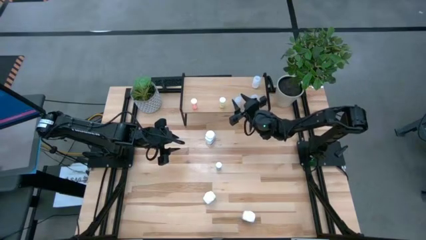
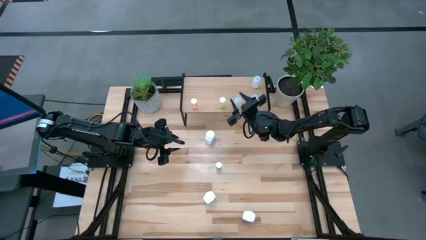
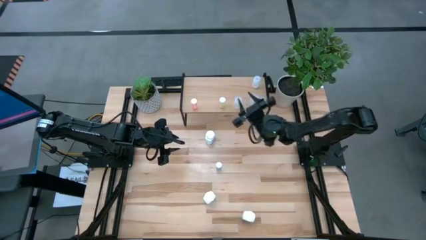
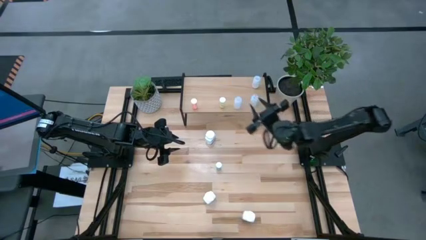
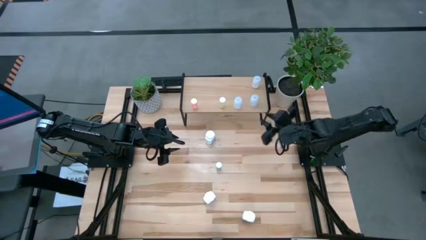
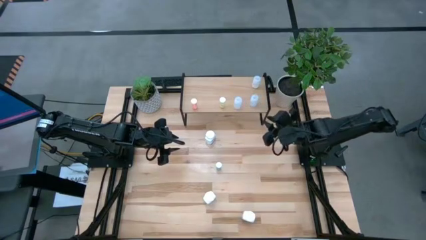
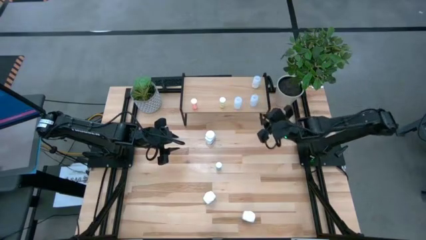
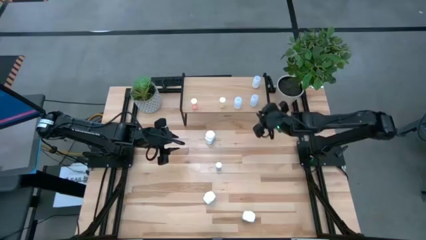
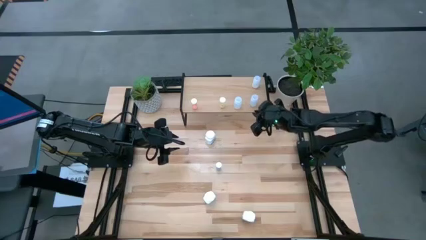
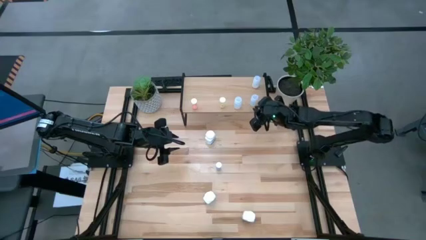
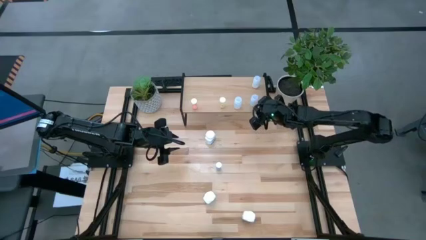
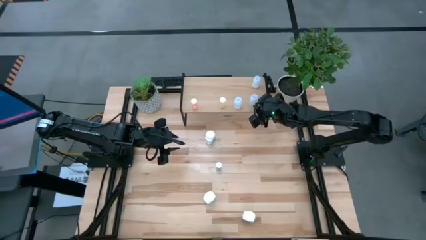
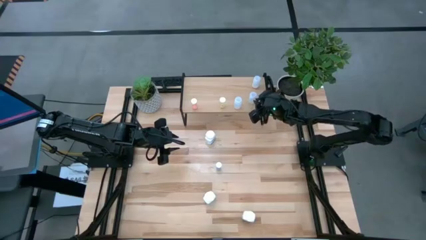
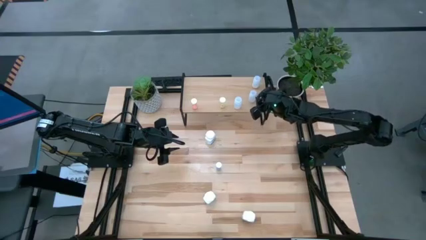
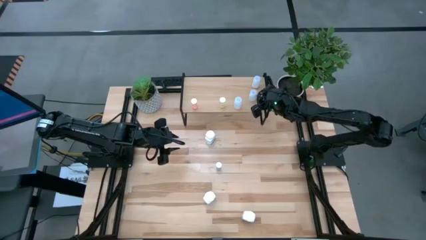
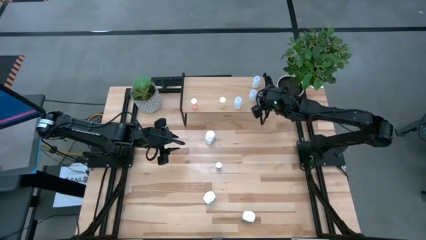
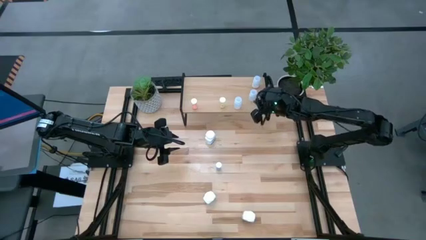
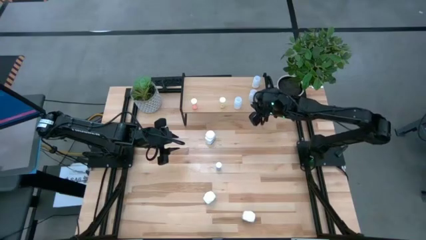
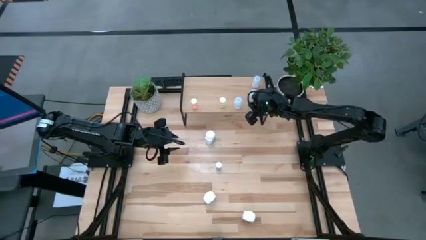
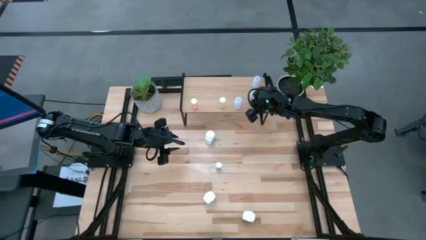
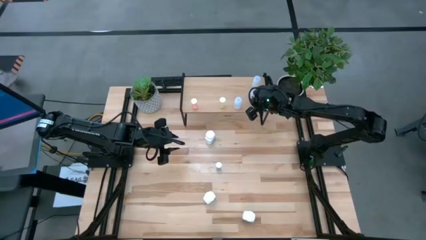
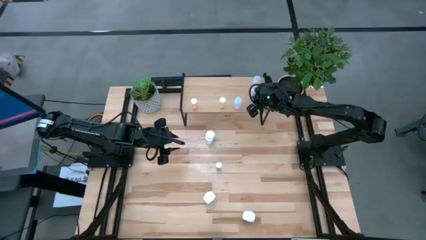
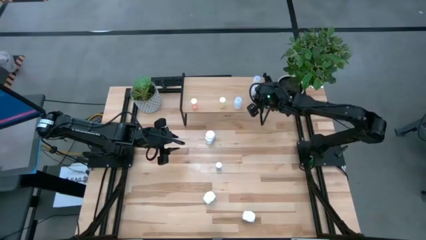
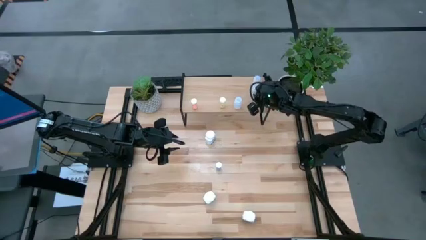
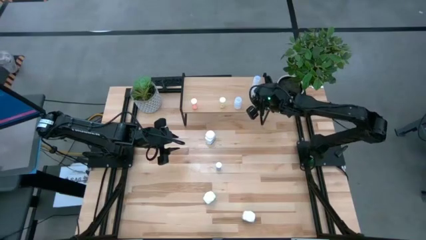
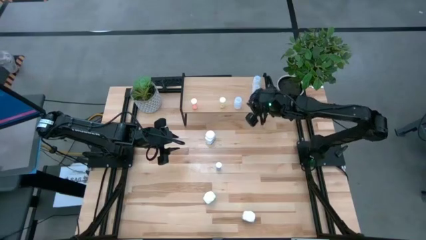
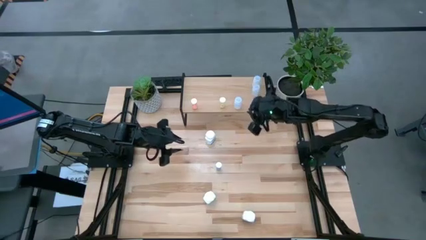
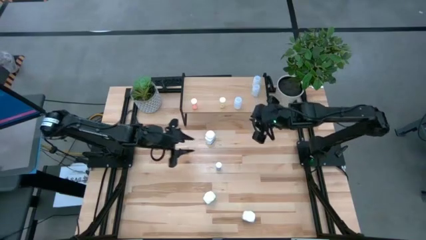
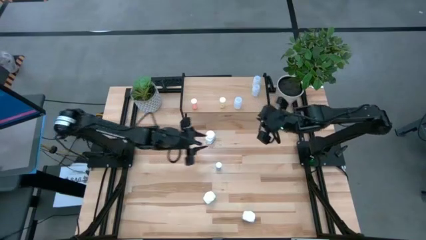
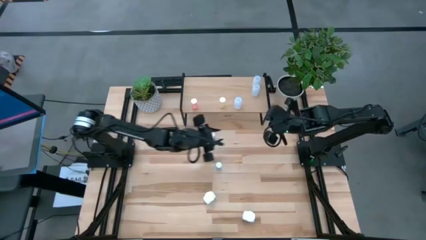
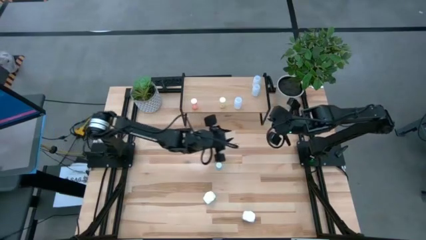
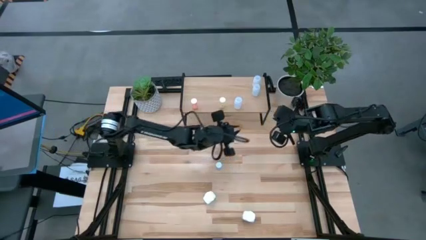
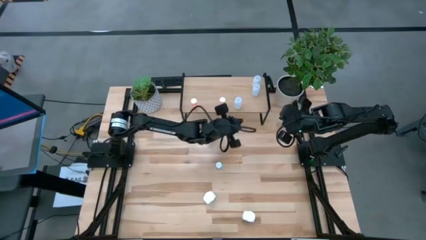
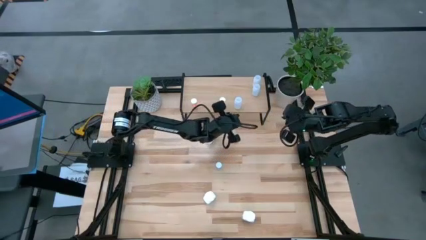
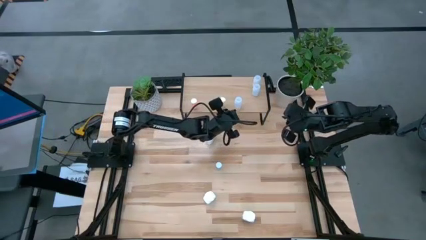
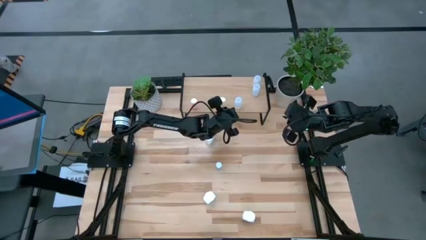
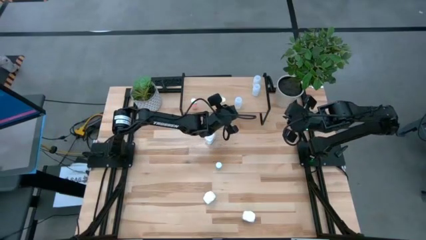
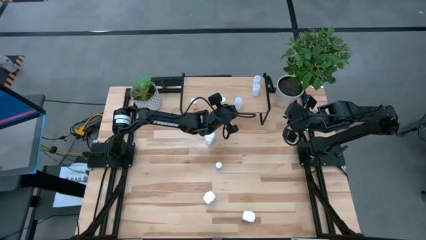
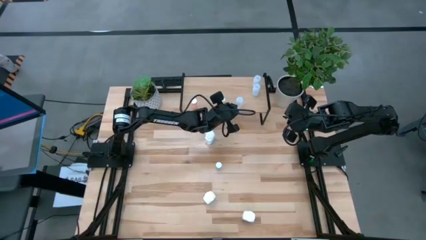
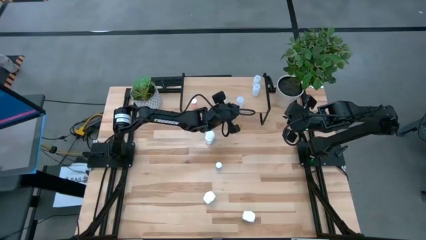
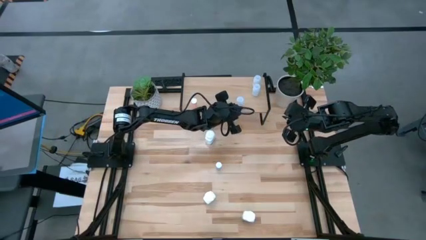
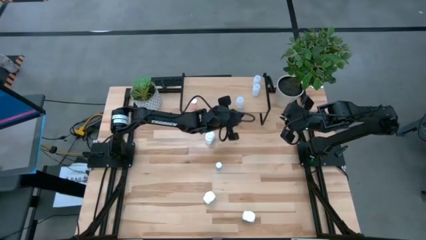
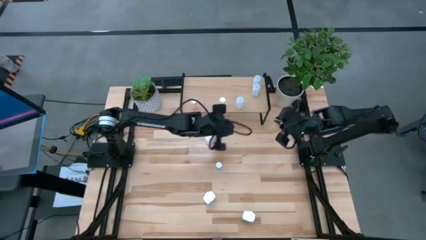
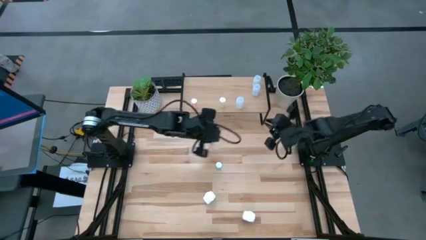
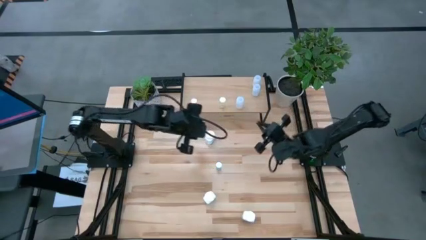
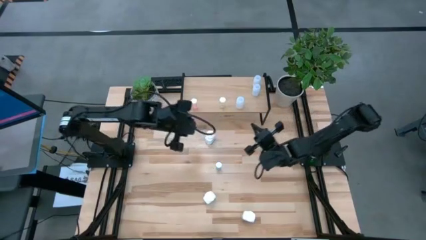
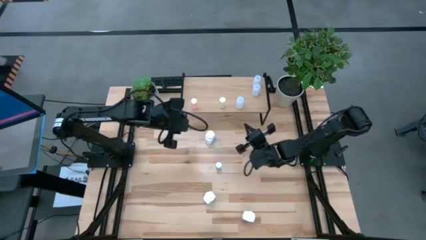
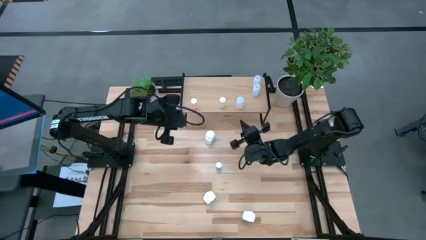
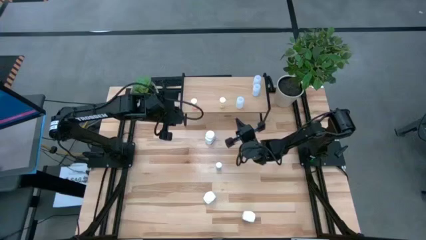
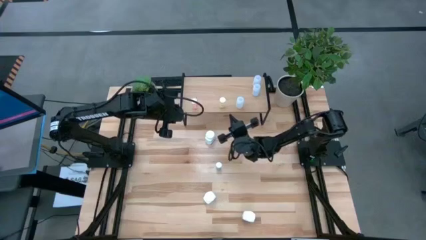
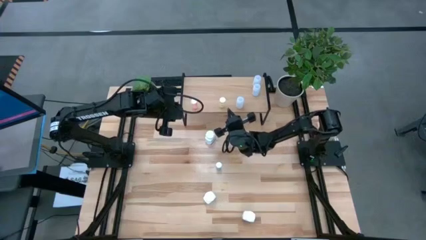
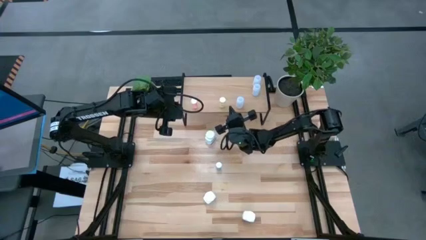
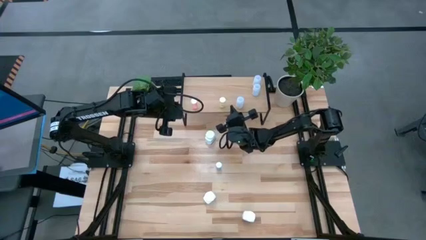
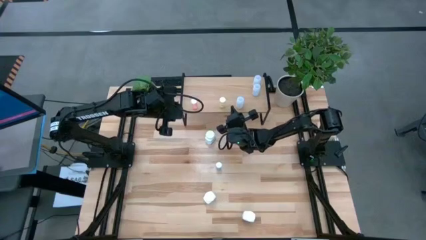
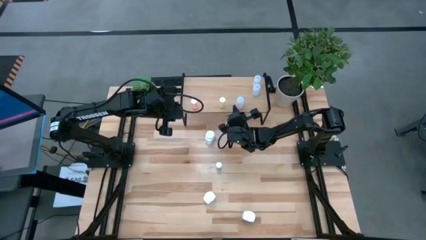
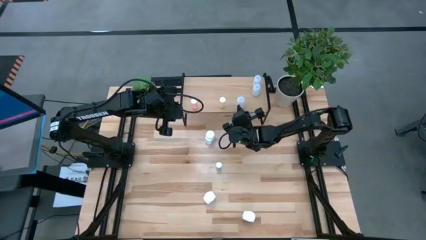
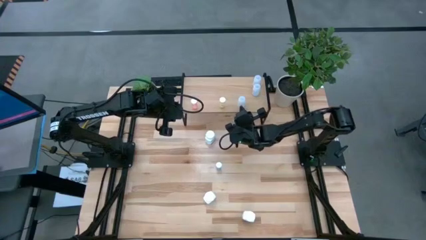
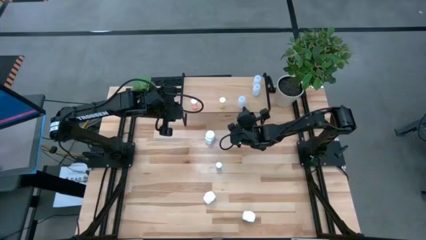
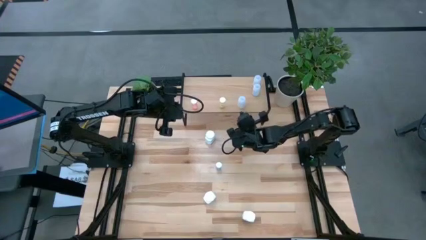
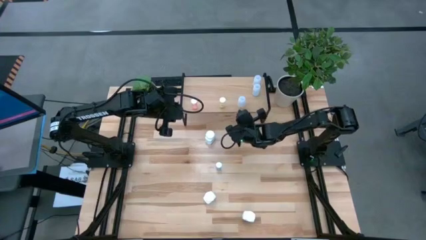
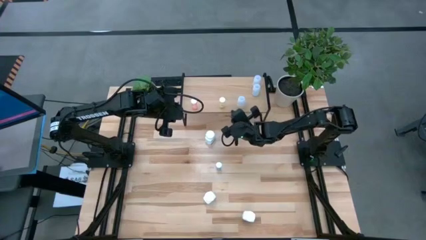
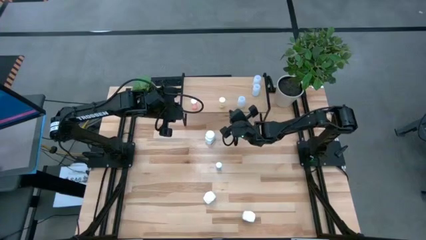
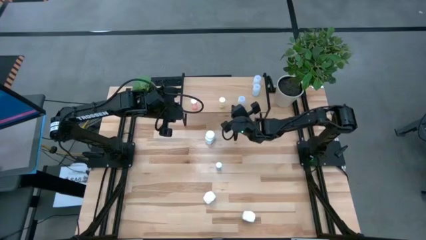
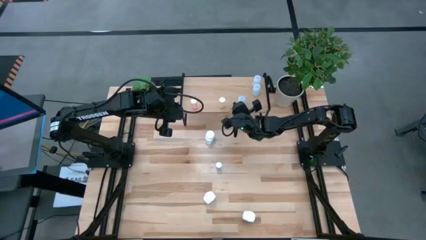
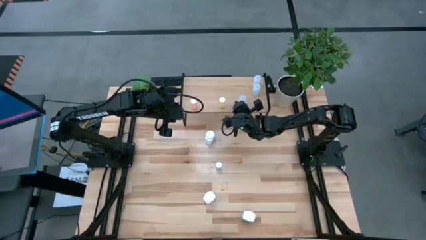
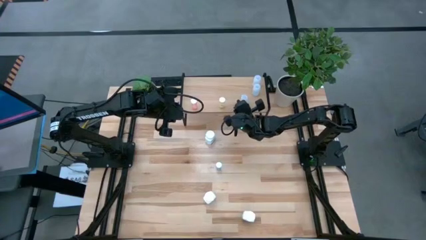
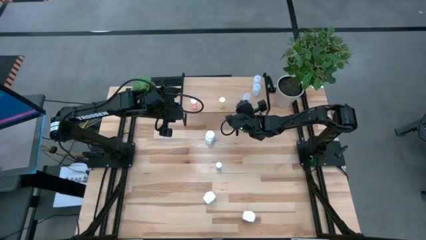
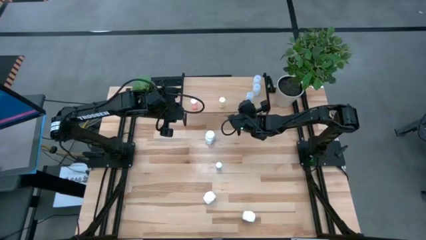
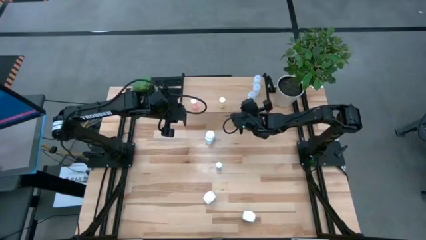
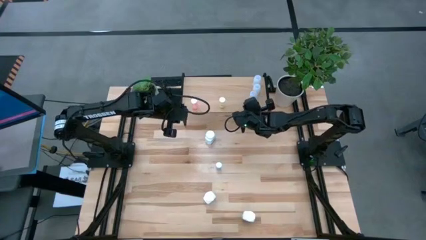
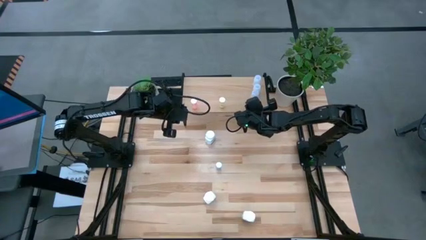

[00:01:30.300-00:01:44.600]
Task: Pick and place medicine bottles onto shelf by color
Adjust the white pills bottles
